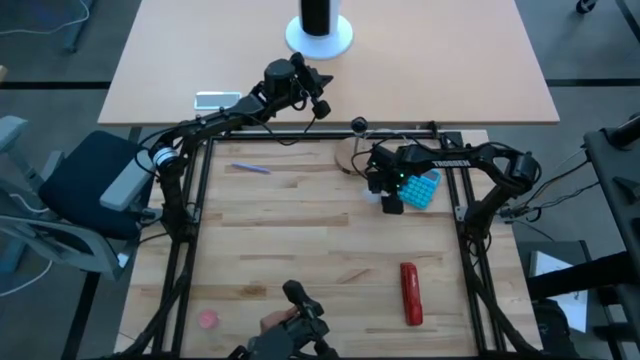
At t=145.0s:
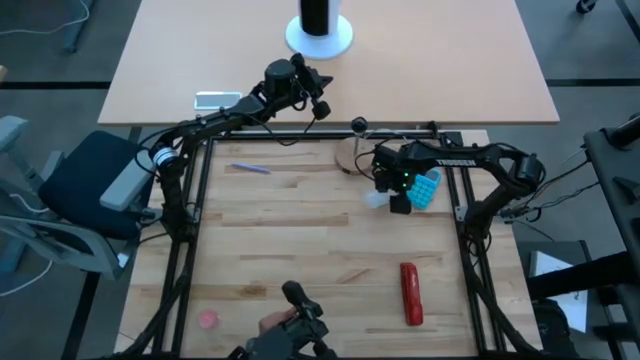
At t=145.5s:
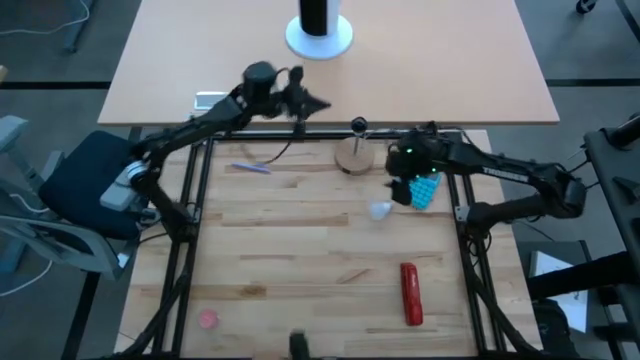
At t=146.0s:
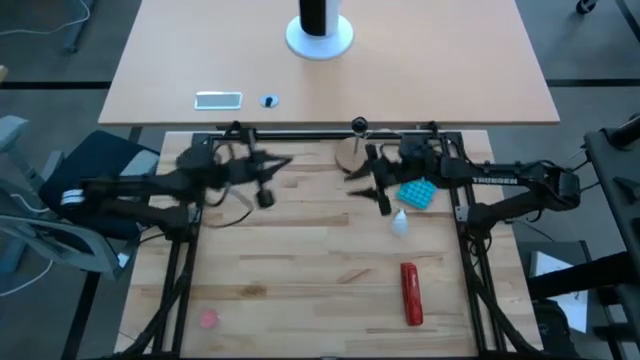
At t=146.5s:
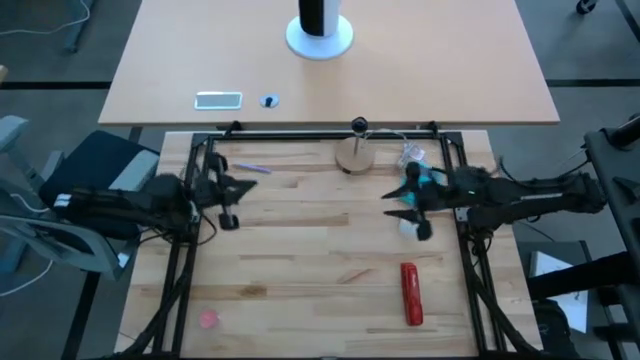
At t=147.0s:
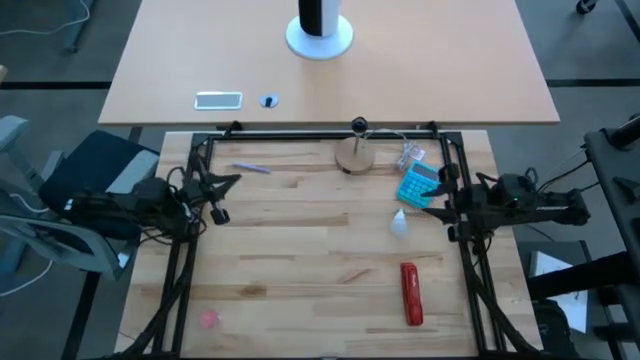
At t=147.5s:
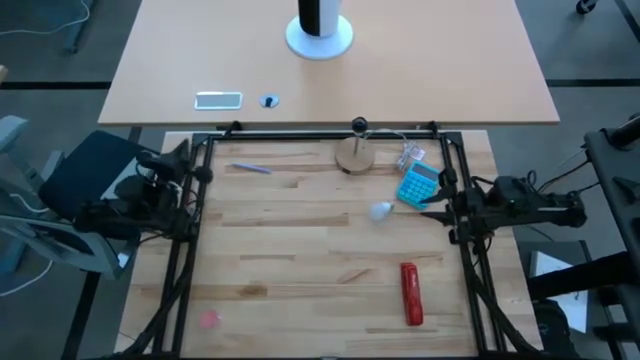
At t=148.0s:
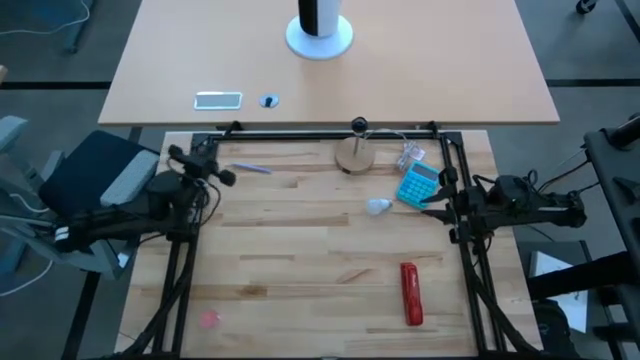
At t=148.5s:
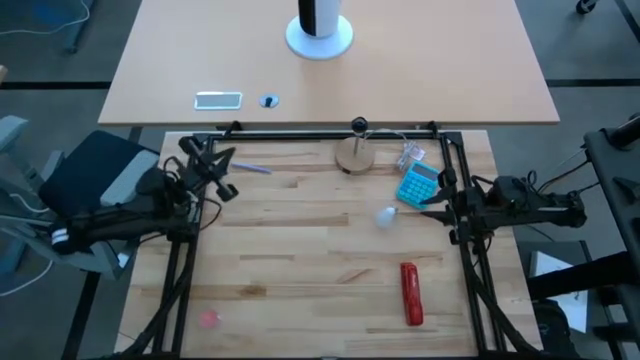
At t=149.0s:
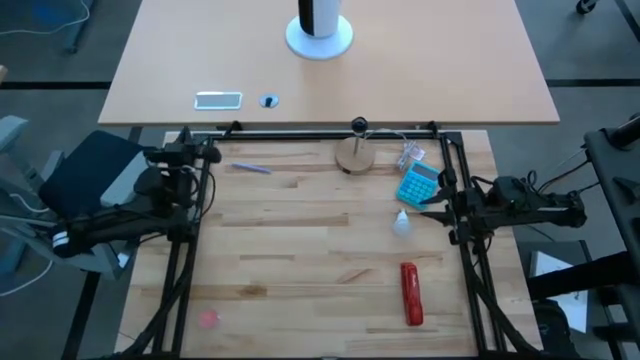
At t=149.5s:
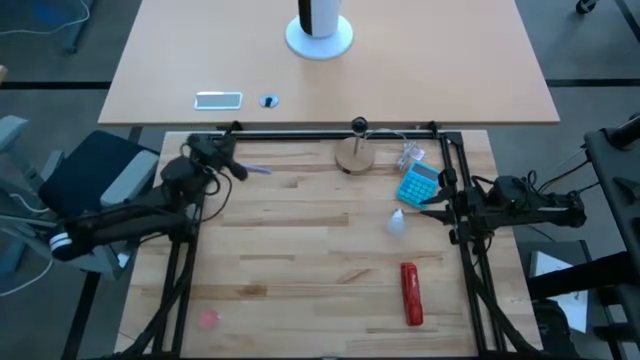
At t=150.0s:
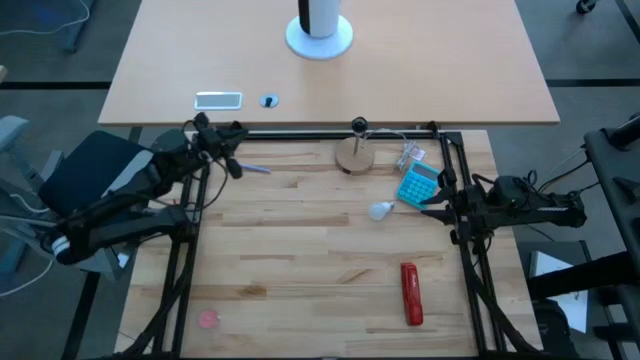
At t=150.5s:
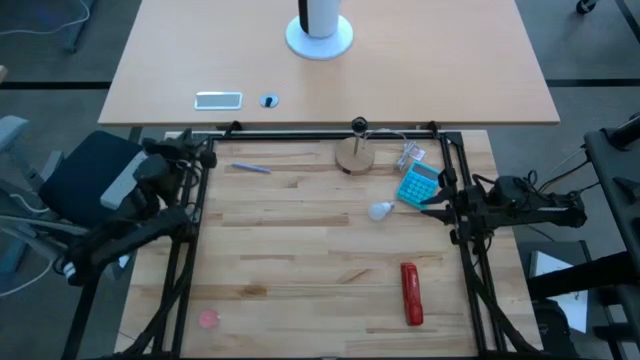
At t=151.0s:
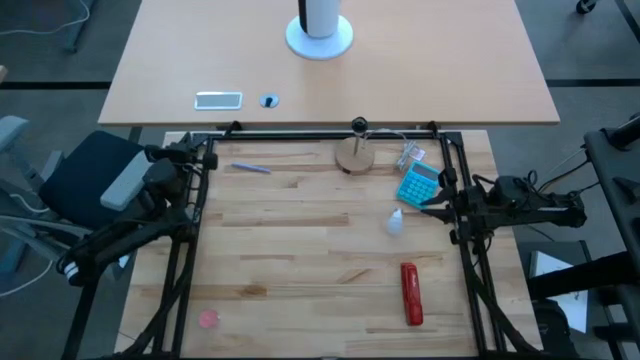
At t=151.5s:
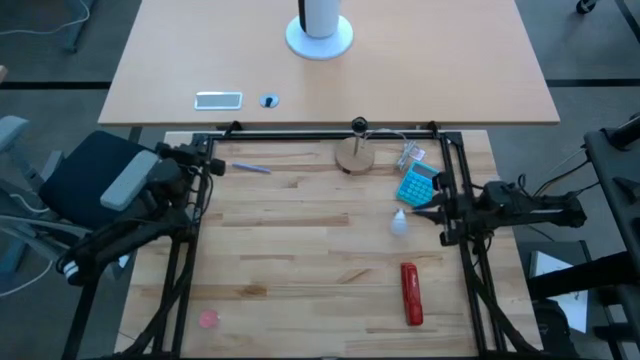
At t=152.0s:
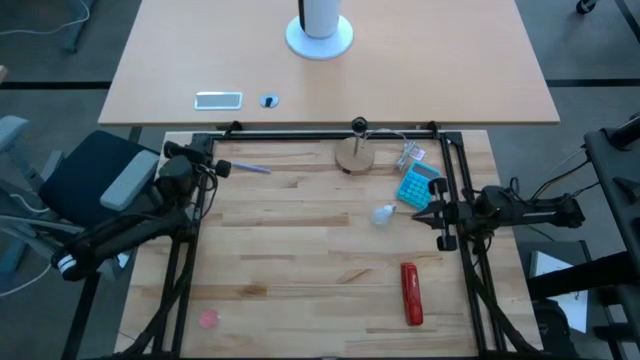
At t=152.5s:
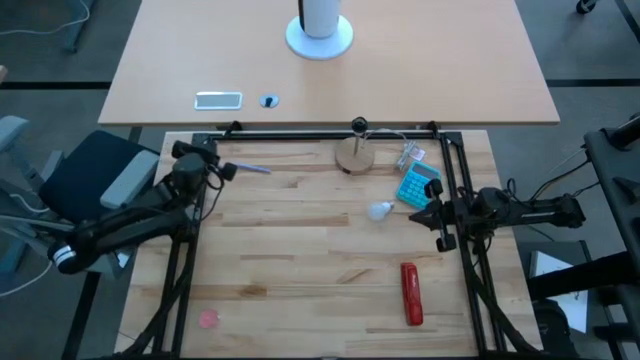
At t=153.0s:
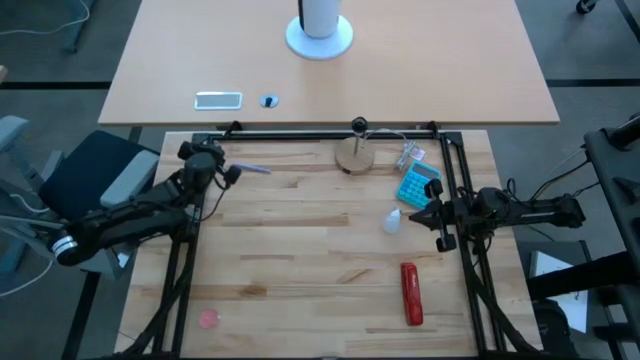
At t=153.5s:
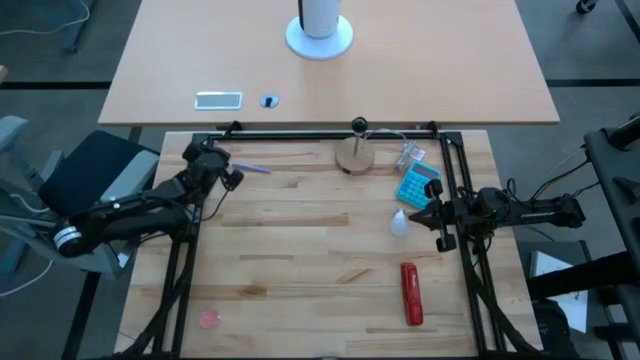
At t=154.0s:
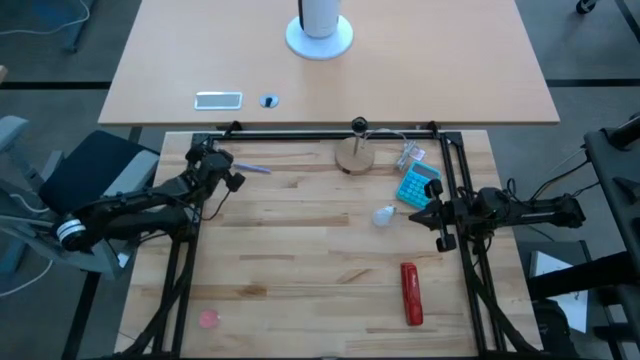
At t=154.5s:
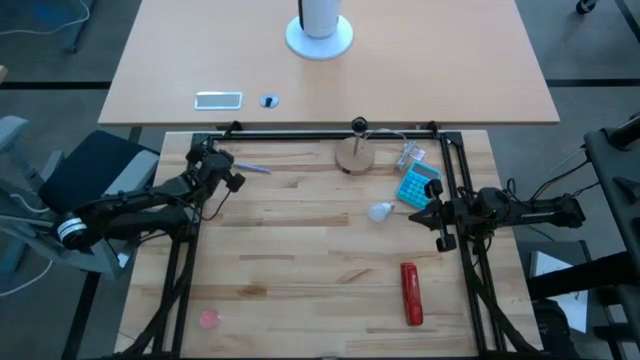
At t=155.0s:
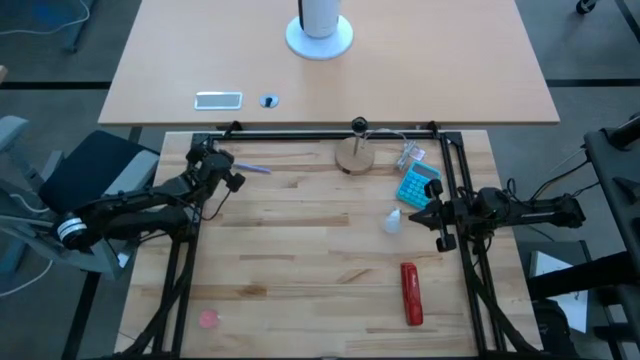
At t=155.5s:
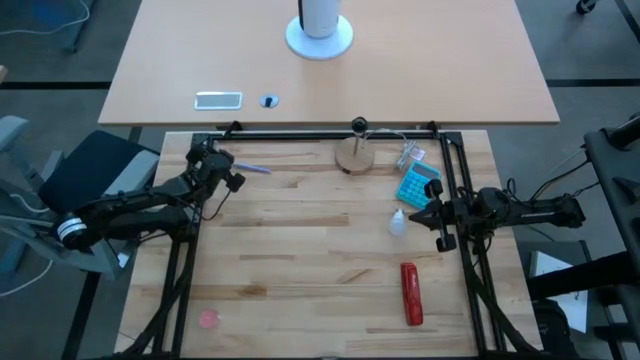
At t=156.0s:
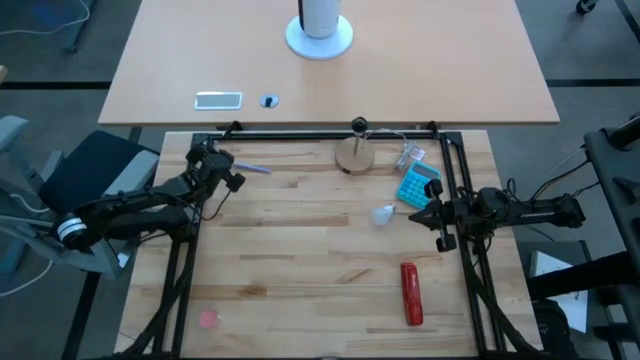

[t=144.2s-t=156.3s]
Task: Screw lightbulb
Return to Home Position

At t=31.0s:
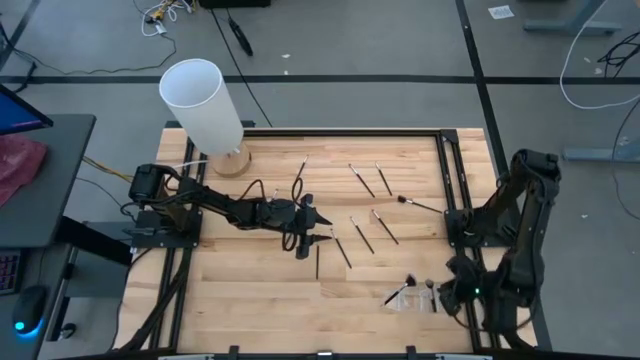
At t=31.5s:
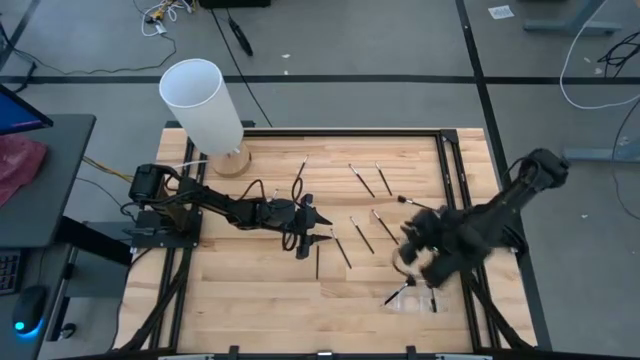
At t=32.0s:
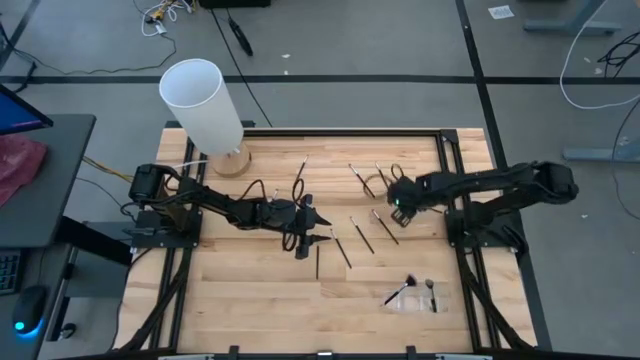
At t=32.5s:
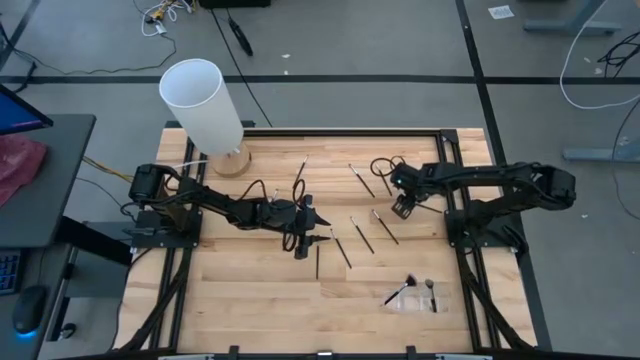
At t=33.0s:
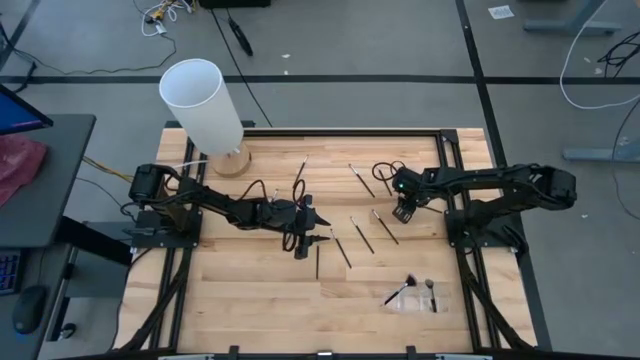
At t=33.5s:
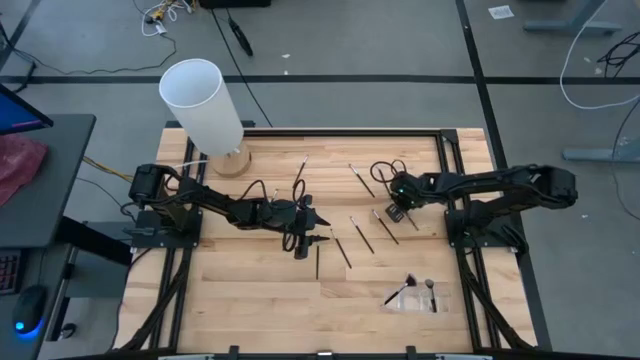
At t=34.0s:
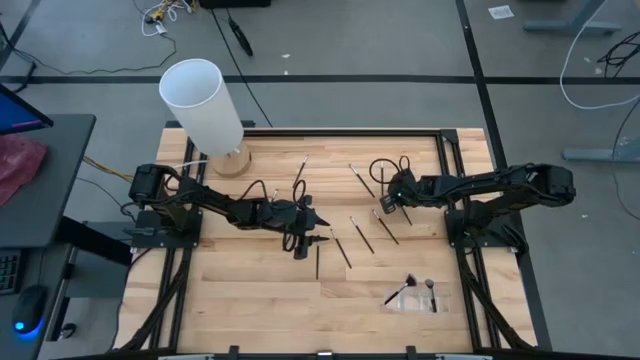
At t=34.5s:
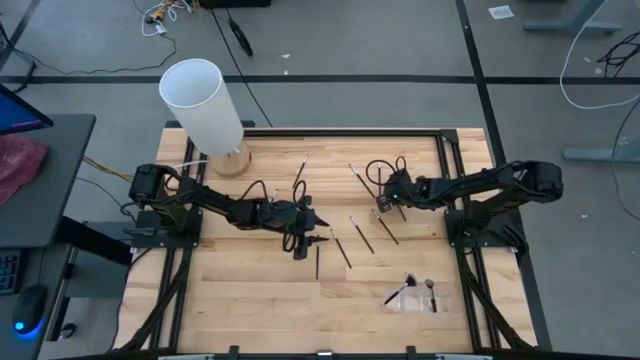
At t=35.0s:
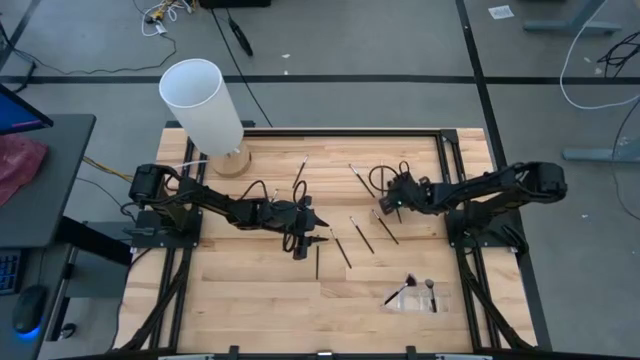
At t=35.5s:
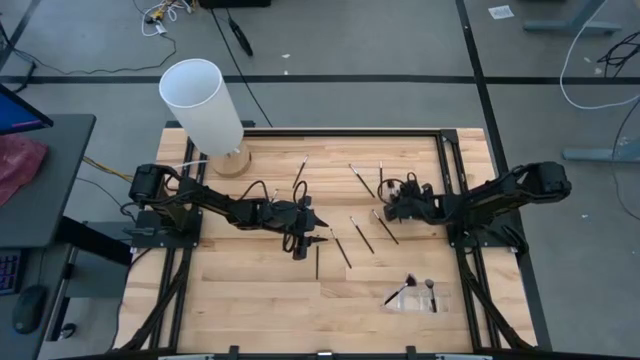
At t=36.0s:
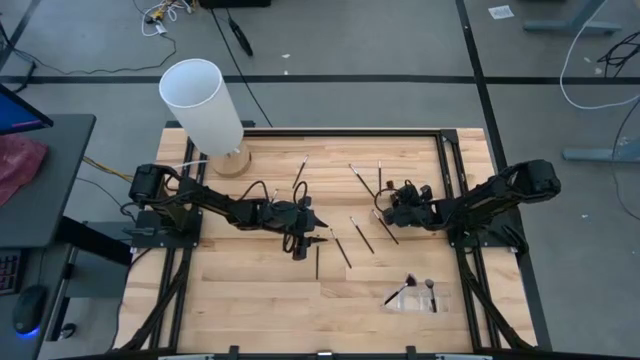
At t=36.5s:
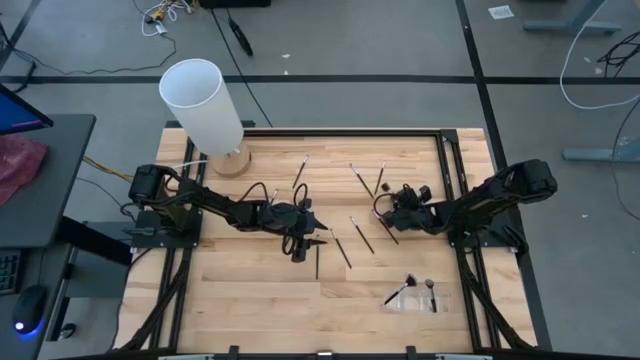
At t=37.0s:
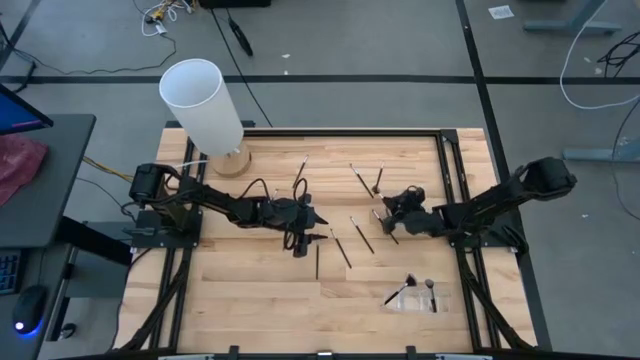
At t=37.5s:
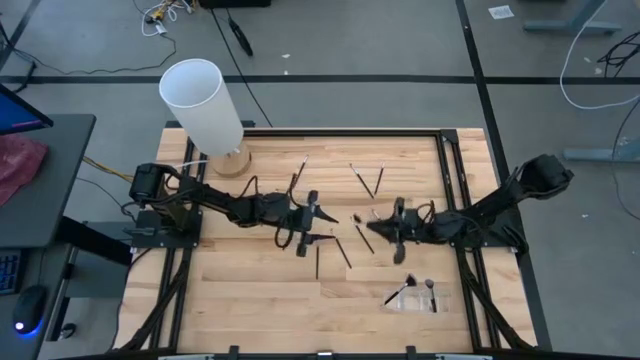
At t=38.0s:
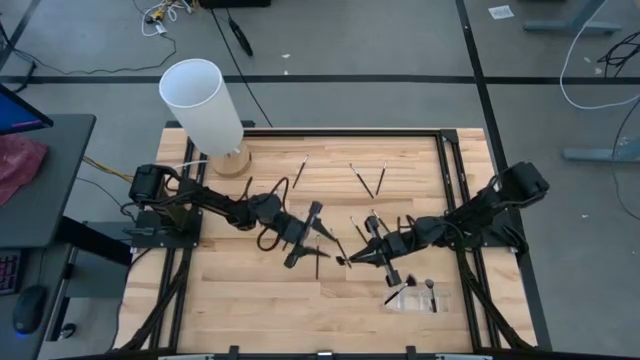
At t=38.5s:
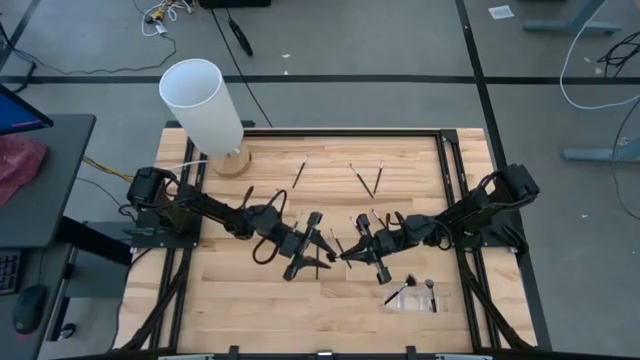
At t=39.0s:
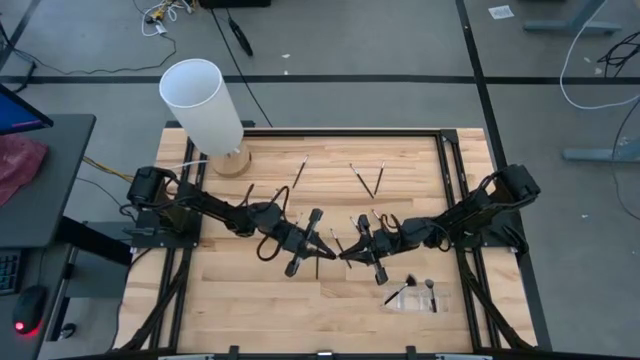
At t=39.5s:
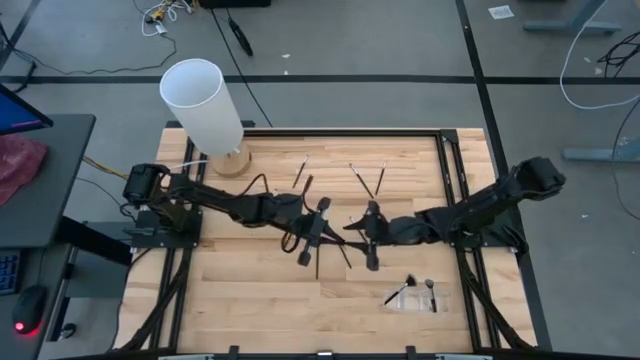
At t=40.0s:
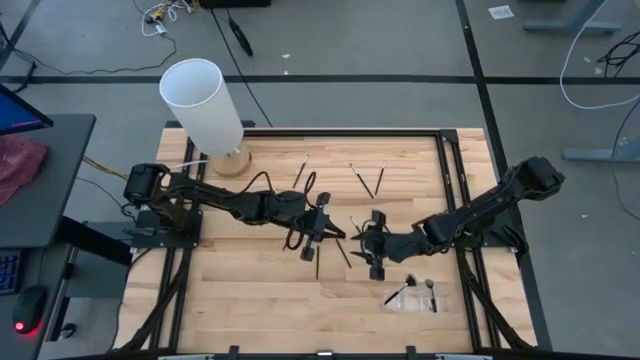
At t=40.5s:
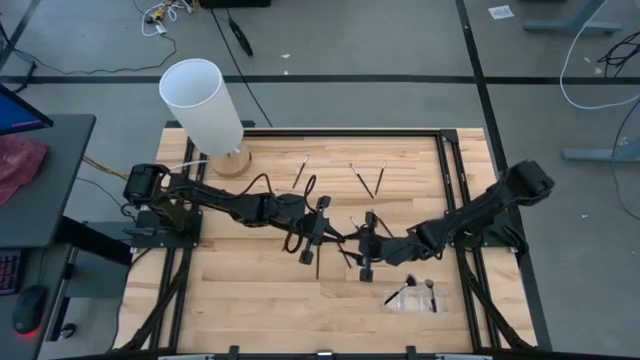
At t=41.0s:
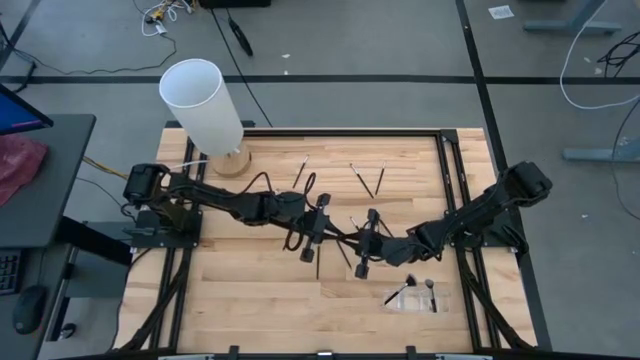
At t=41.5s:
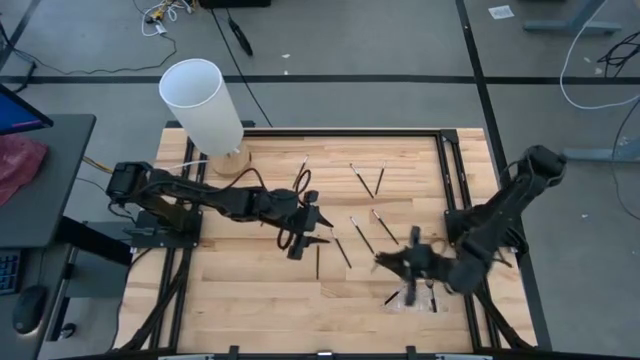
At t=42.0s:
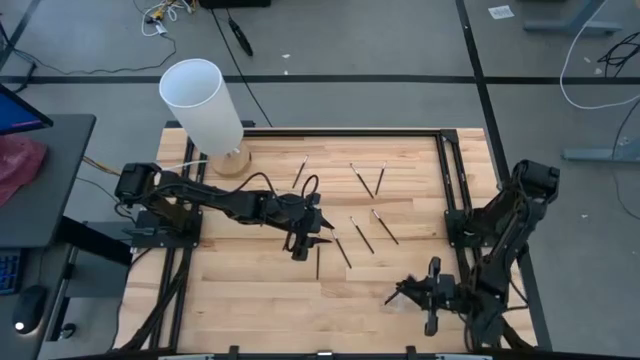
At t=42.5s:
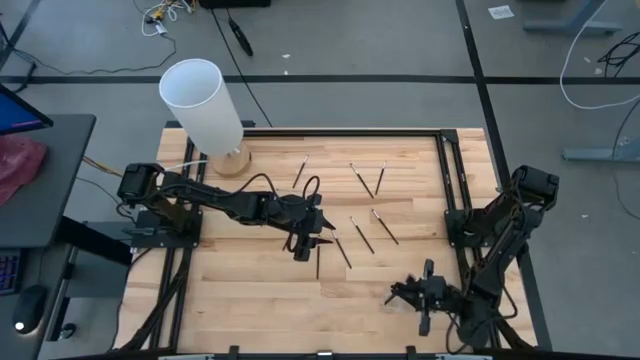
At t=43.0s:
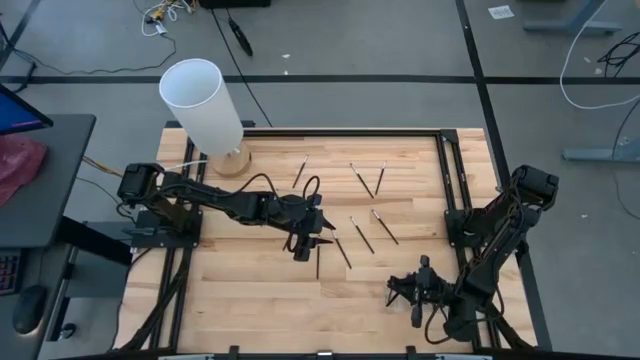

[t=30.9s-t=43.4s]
Task: Pick & Place Makeup Supplies
Put the silver makeup brush into the transparent organizer
